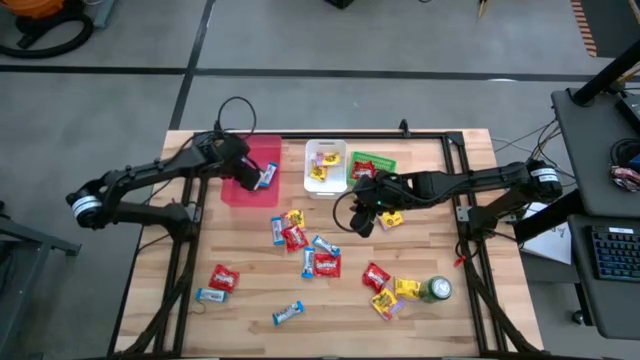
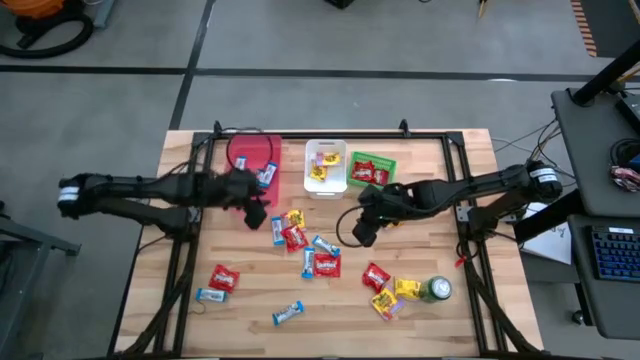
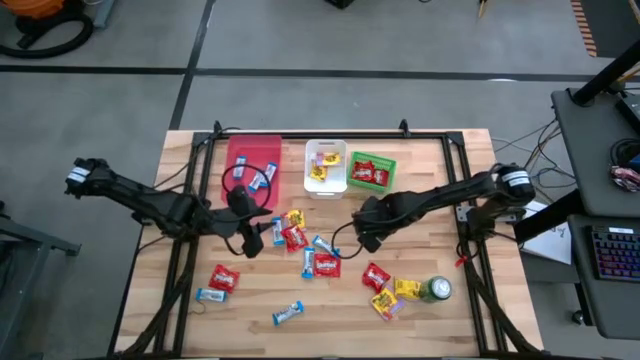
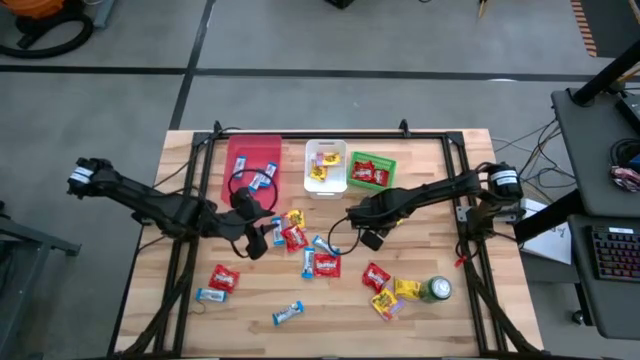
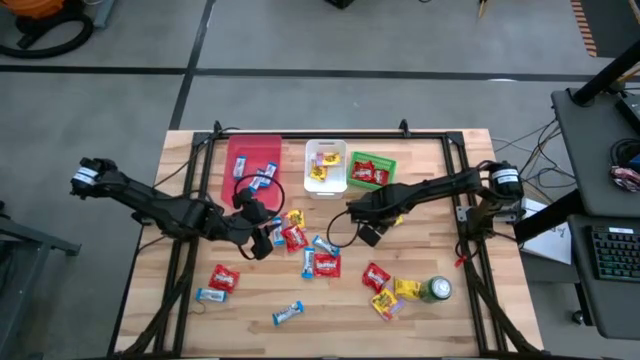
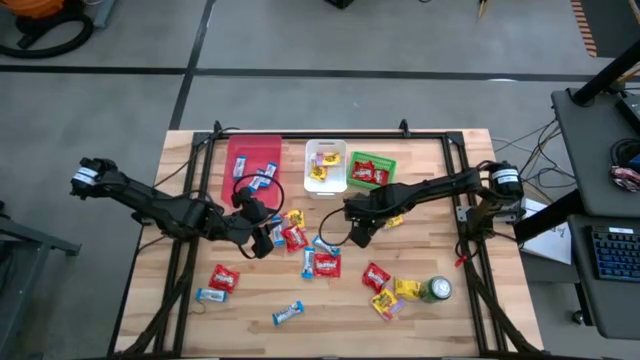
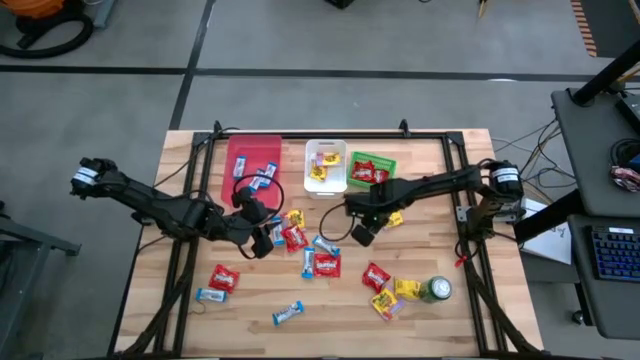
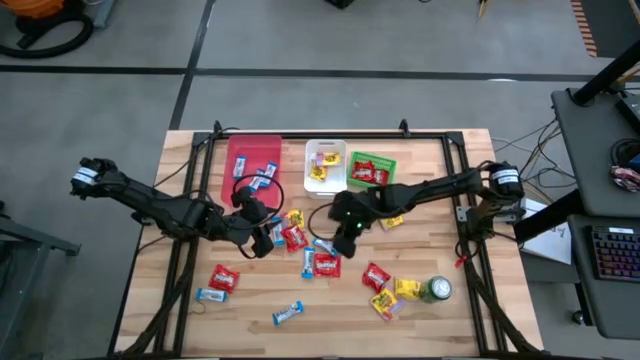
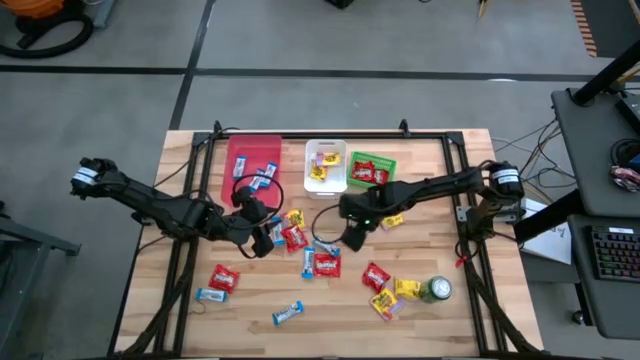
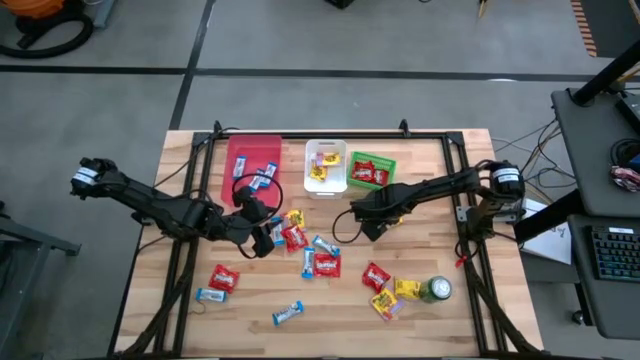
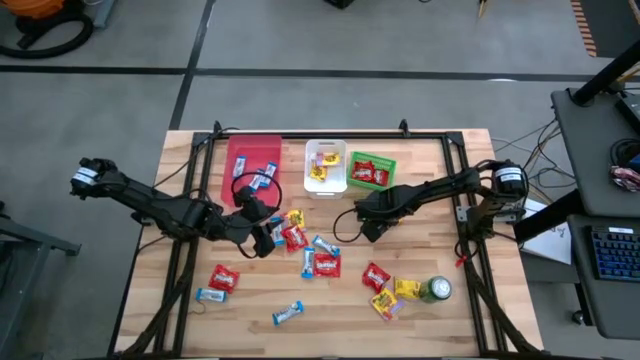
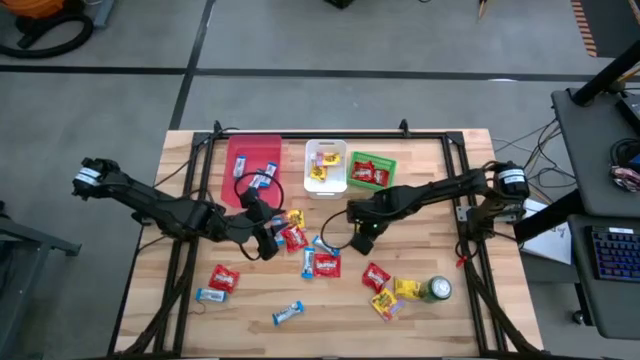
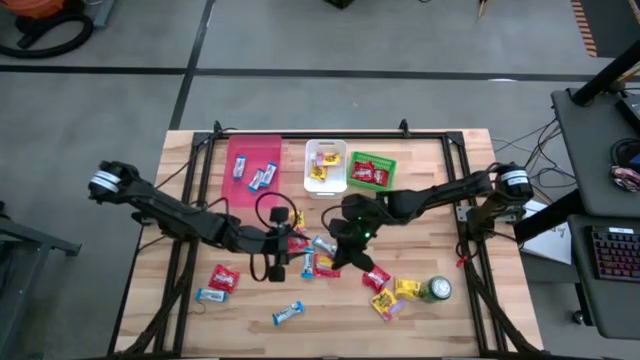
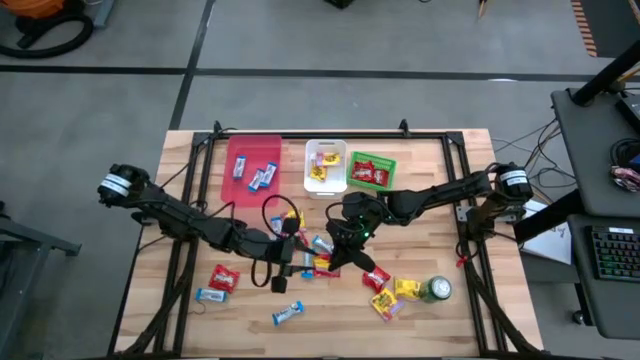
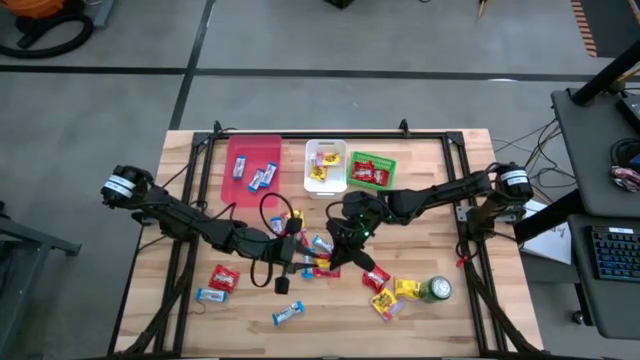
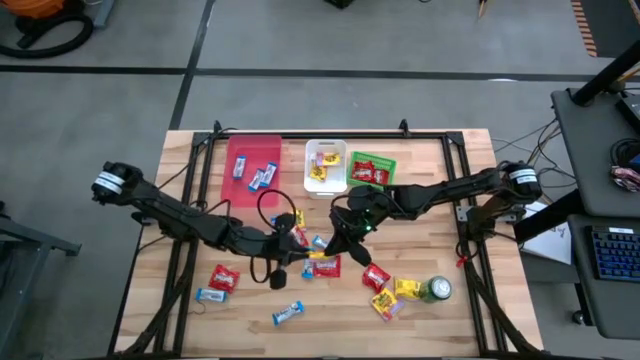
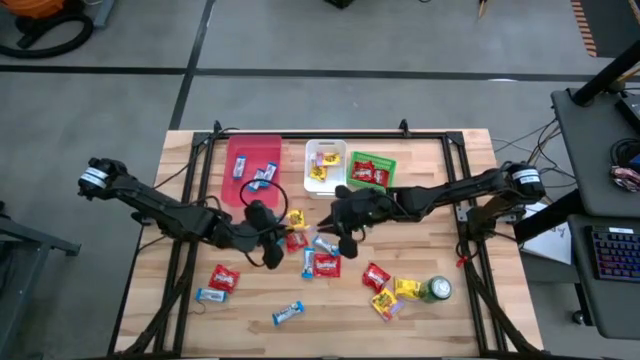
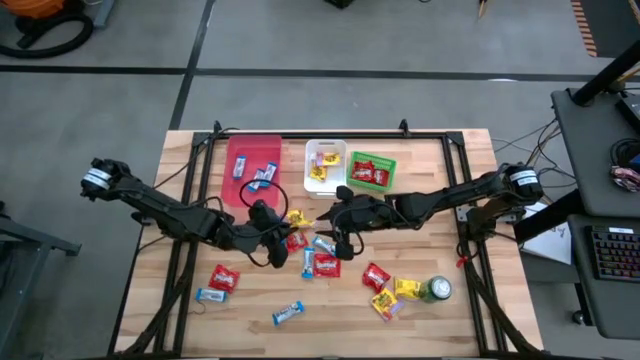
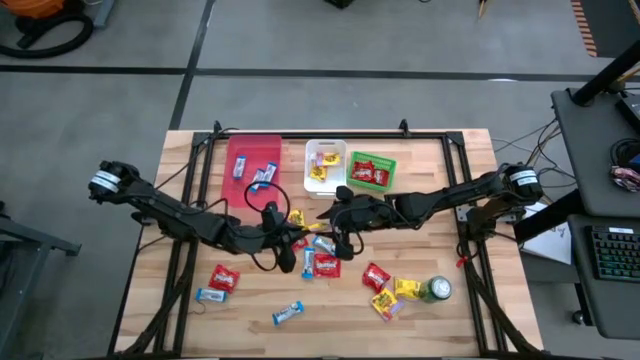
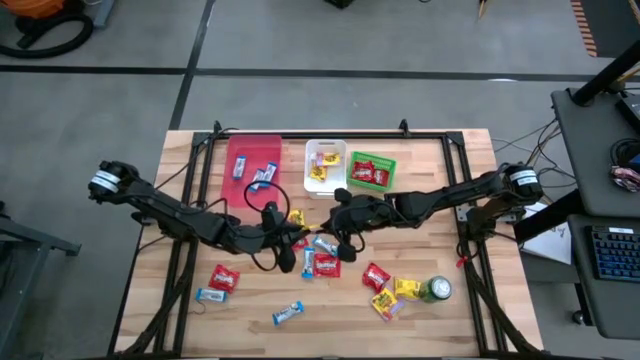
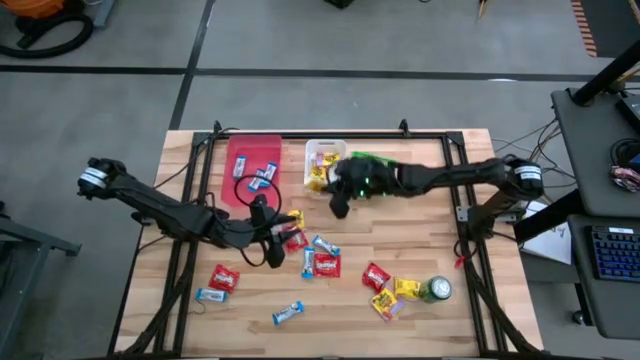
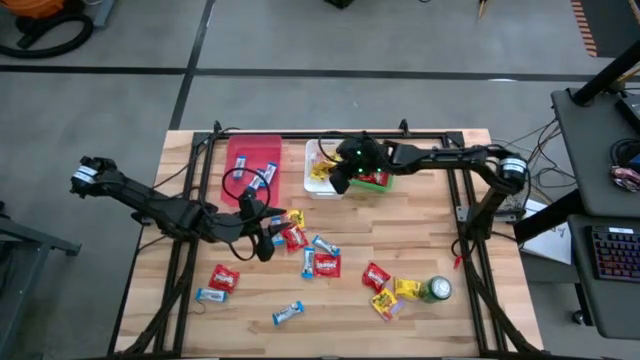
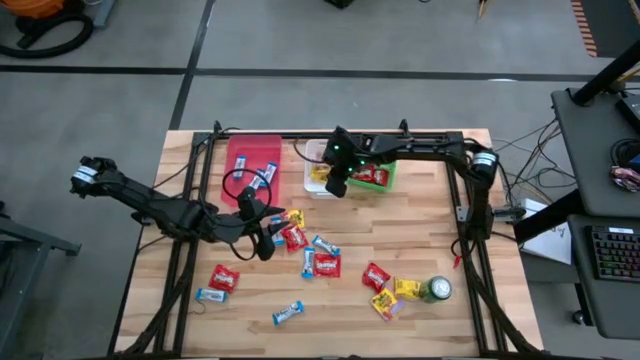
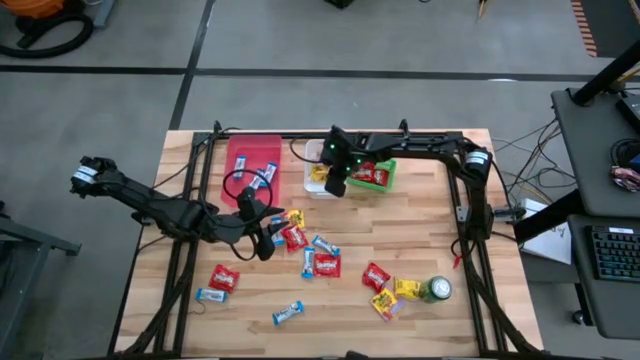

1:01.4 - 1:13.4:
Task: Sort candy
Put the yellow candy into the white bin

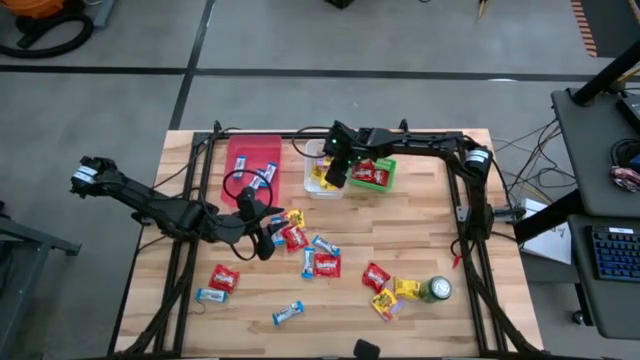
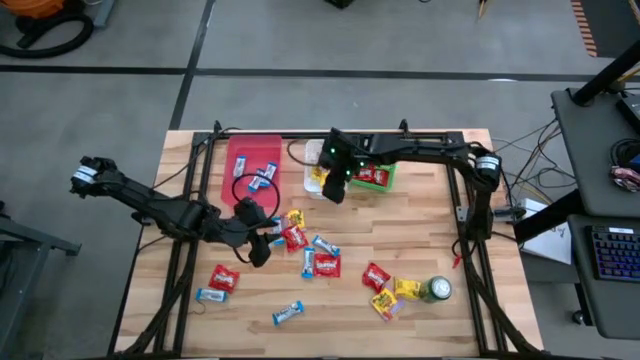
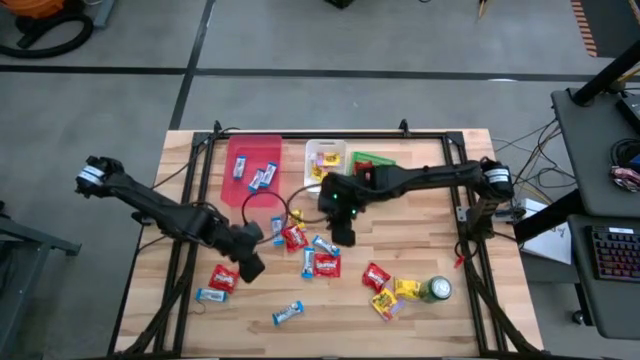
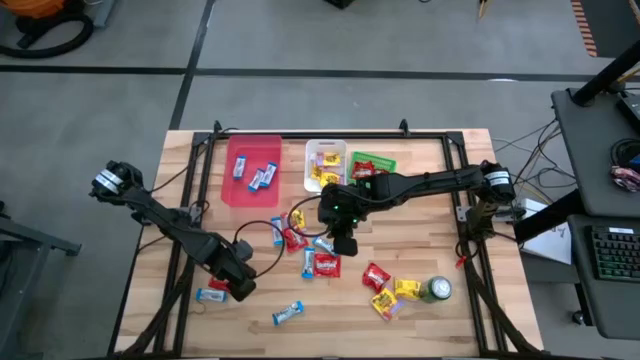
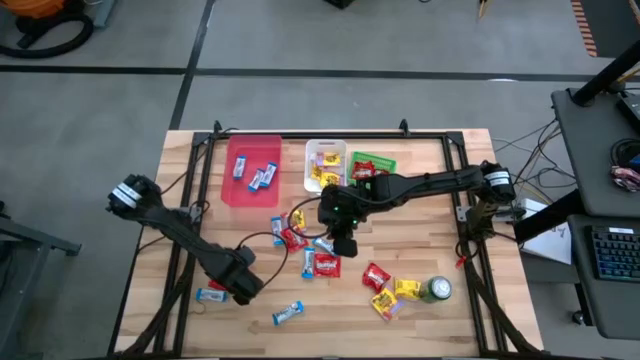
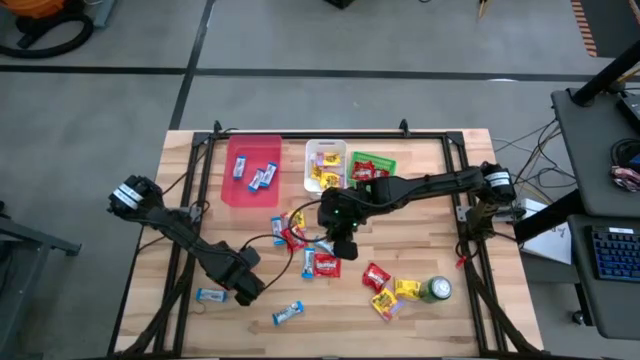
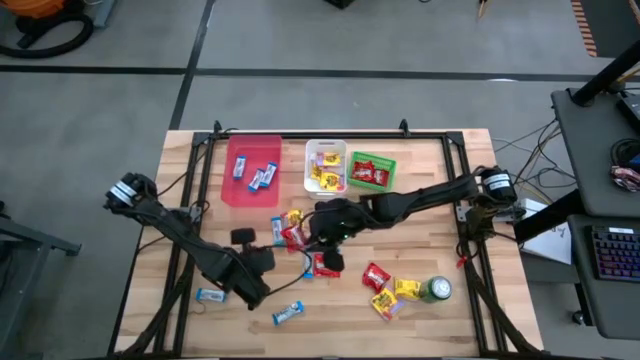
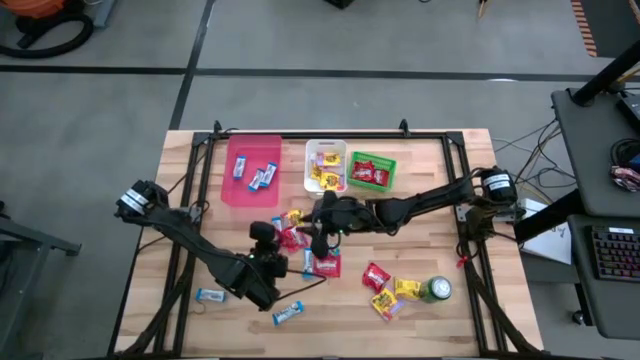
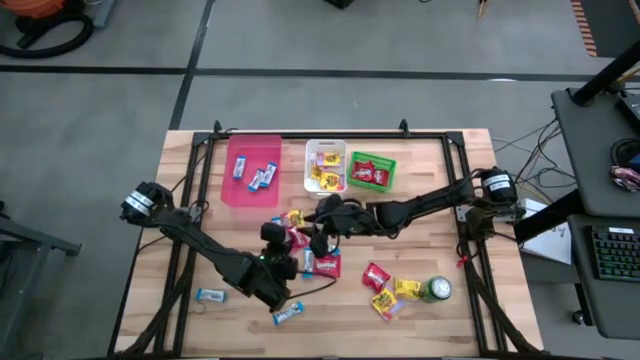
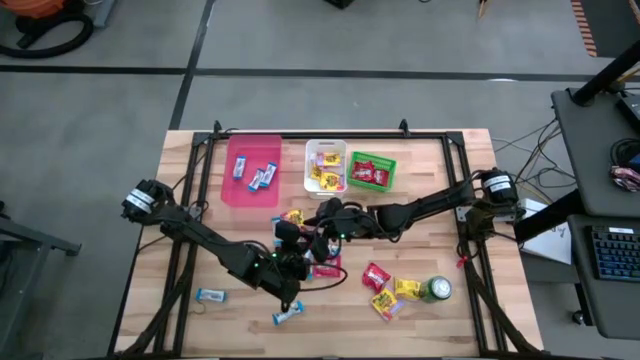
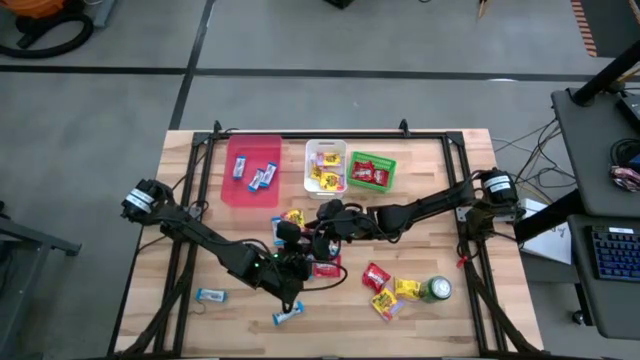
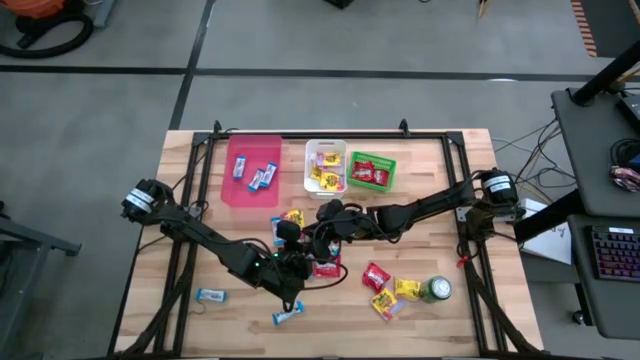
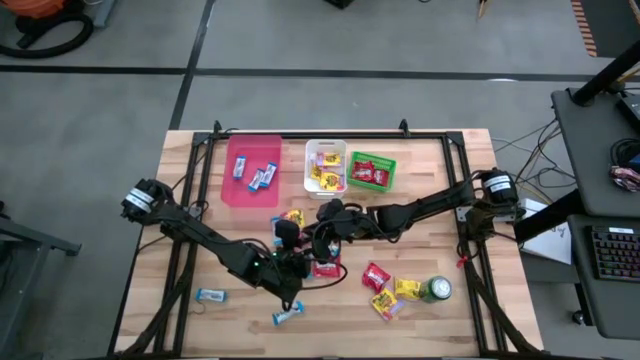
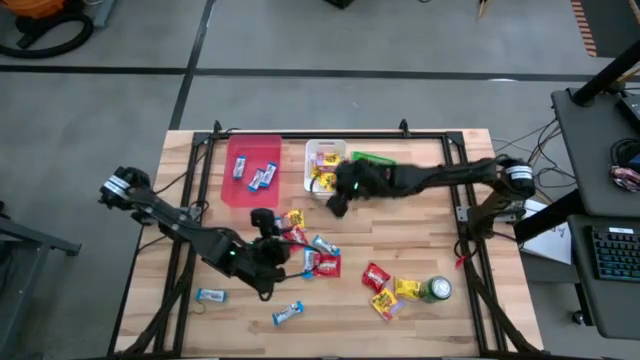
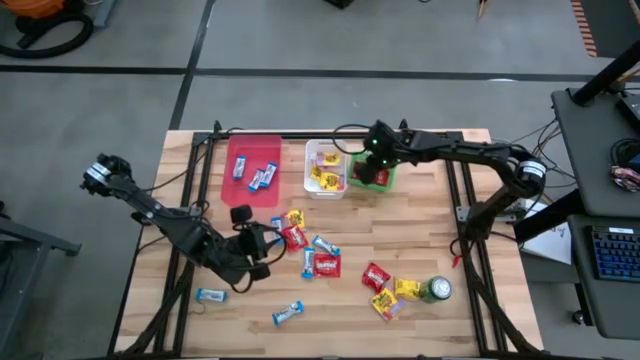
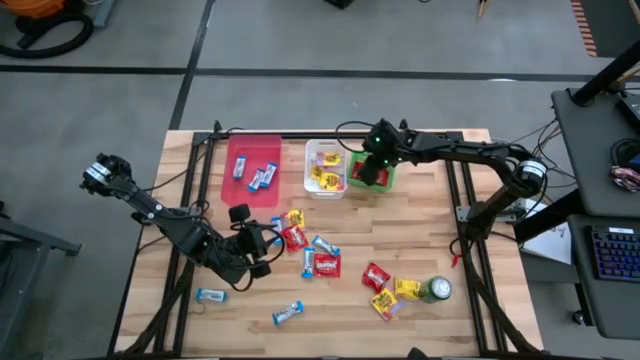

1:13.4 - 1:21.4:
Put the red candy into the green bin
